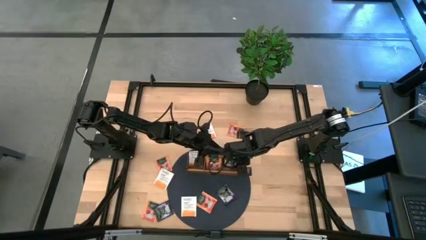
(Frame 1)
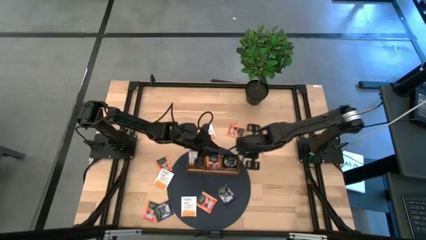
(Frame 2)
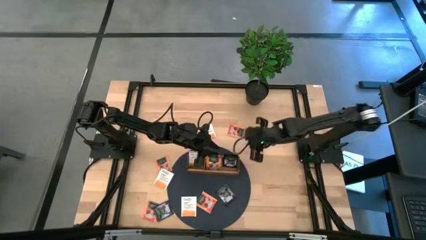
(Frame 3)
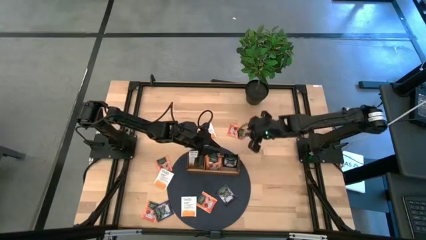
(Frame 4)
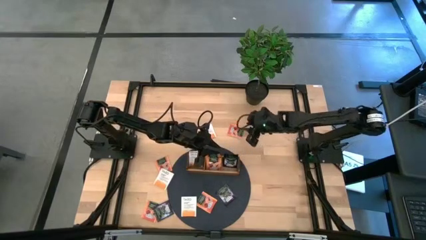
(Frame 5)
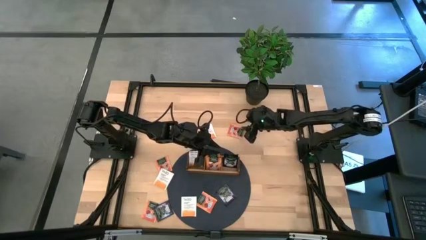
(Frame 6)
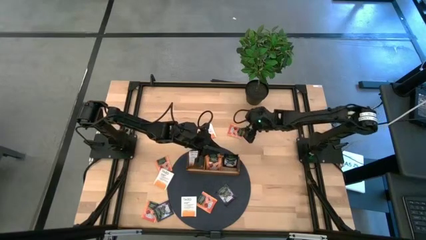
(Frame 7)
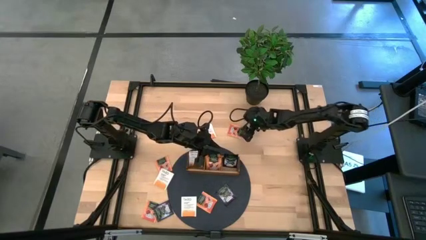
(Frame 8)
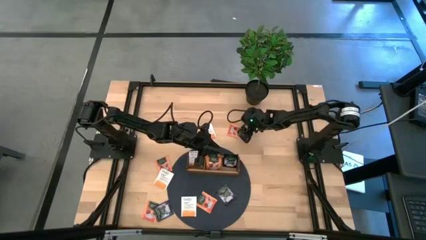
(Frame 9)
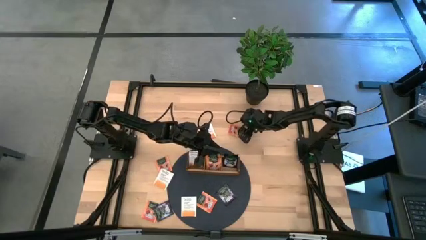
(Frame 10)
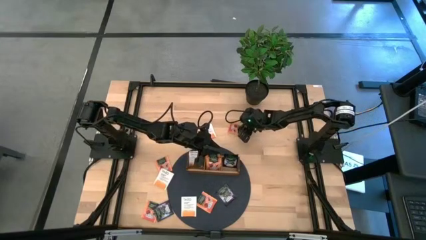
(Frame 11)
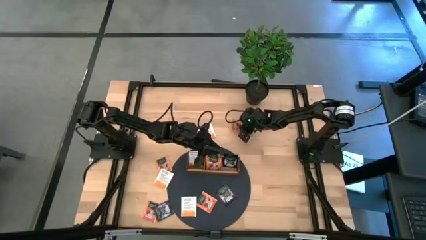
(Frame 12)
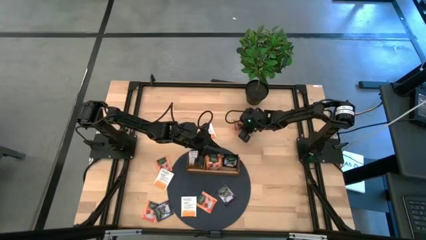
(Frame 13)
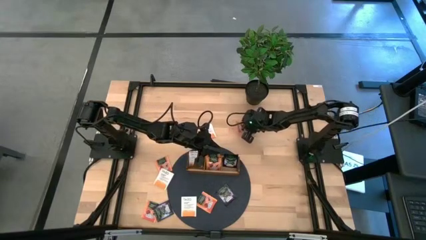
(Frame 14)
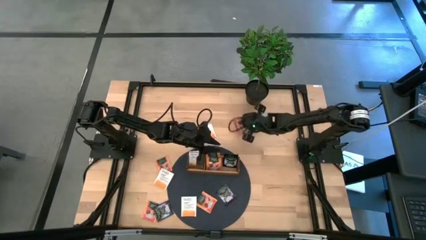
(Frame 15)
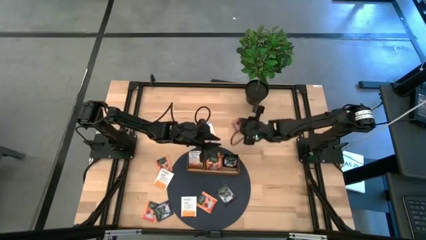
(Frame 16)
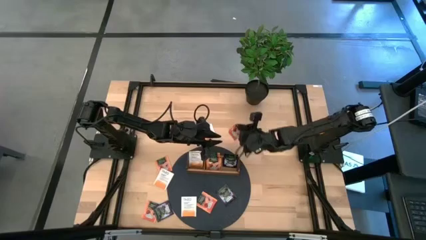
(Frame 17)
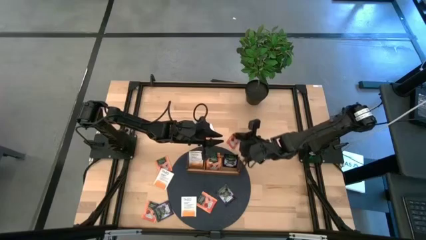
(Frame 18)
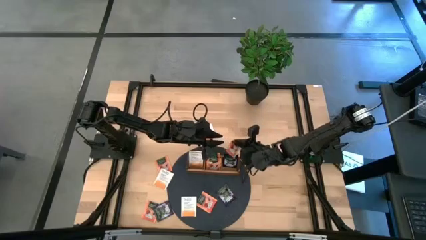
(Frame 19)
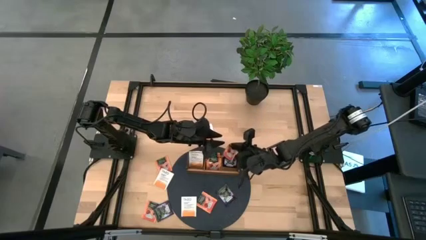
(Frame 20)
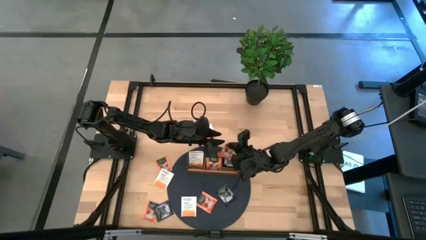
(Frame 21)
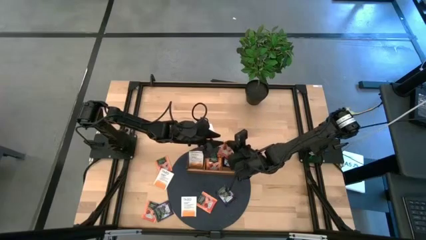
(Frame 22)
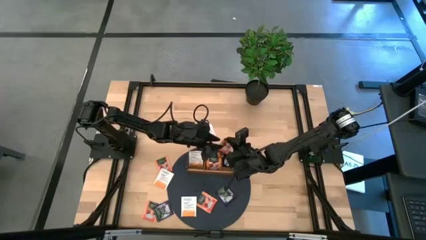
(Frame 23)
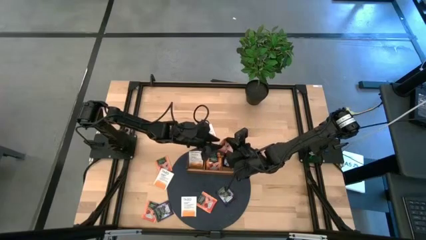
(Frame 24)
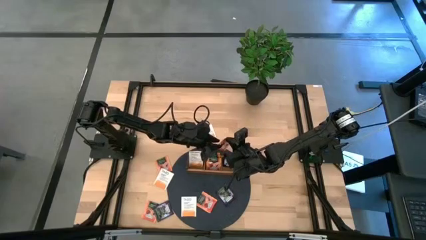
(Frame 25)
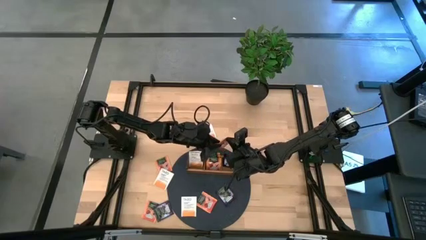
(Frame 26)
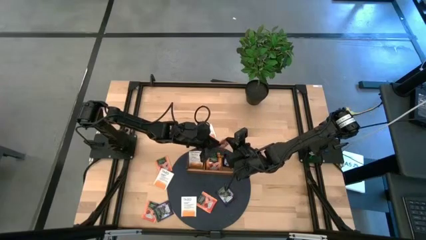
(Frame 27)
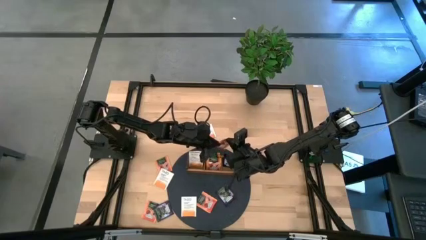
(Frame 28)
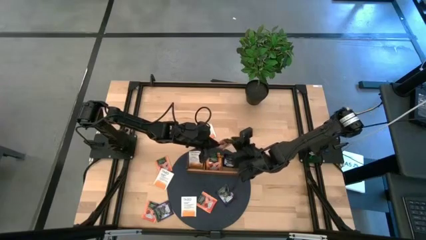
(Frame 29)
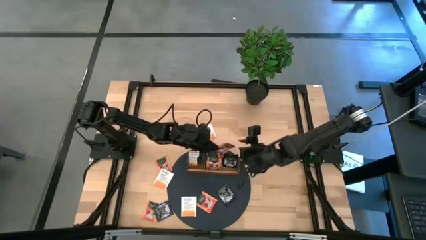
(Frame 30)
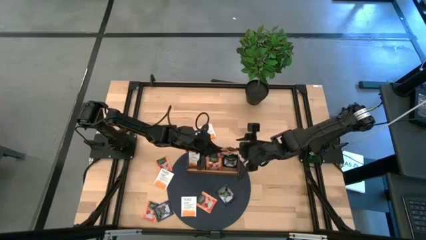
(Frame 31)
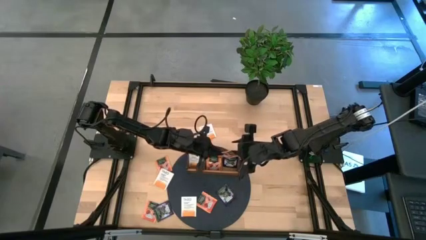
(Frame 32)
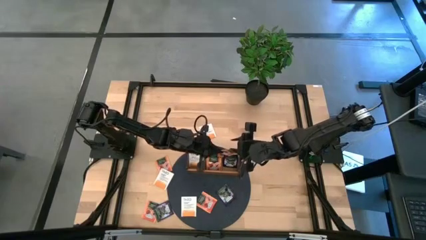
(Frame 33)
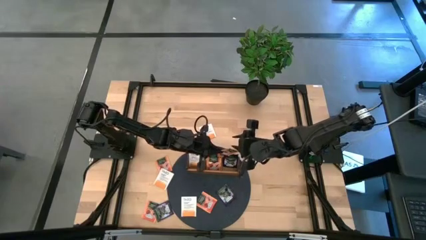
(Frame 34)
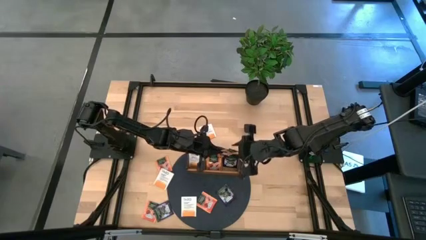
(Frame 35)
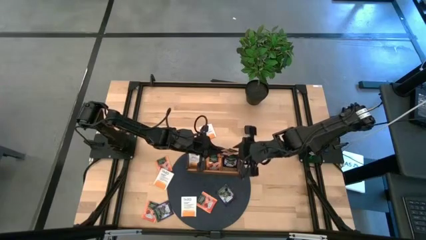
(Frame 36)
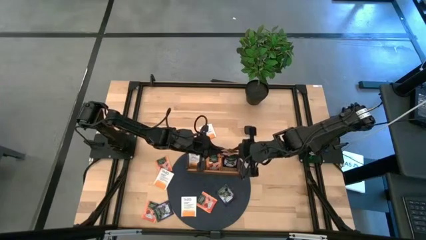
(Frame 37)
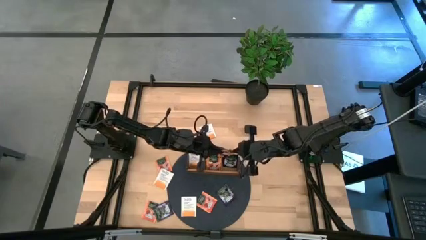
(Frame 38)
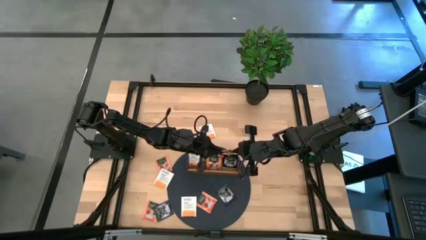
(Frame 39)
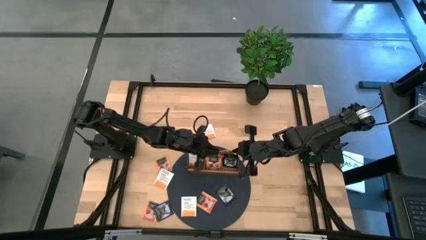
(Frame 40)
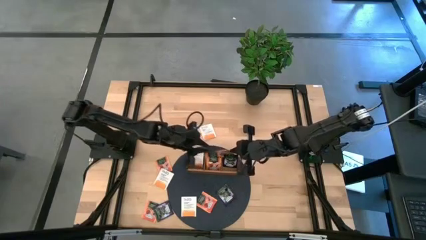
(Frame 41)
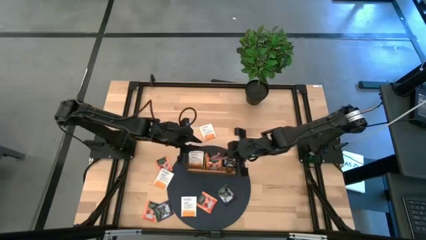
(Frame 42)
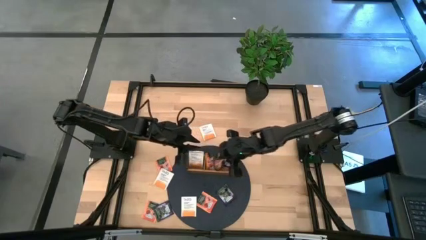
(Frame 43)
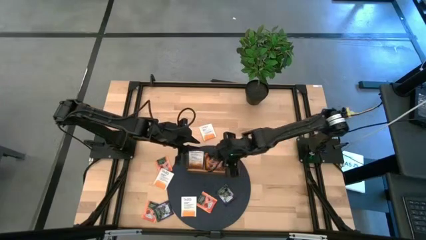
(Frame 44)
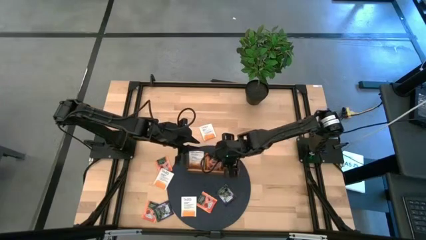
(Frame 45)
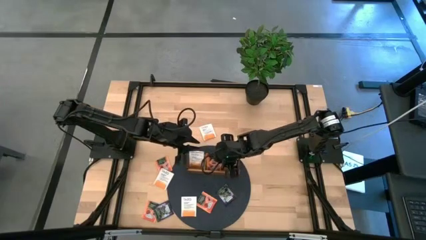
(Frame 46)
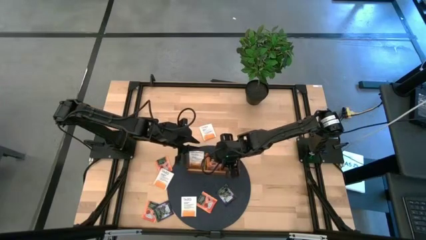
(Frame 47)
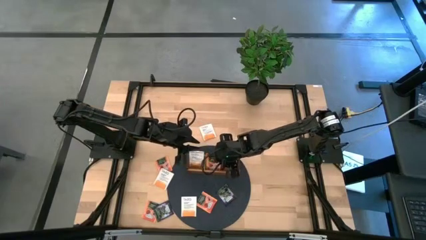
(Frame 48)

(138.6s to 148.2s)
Task: Pick & Place Tea
Put the orange black tea bag into the middle section of the wooden organizer

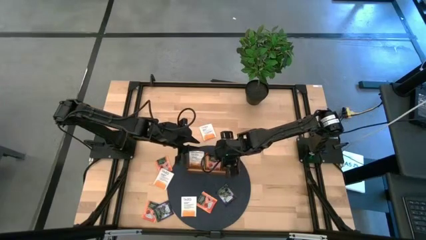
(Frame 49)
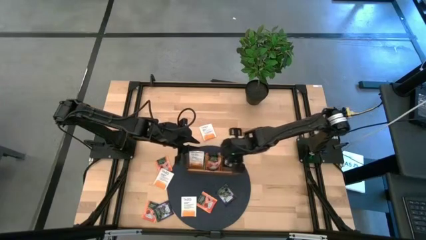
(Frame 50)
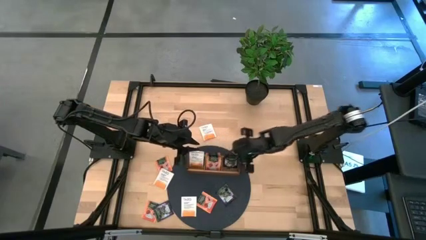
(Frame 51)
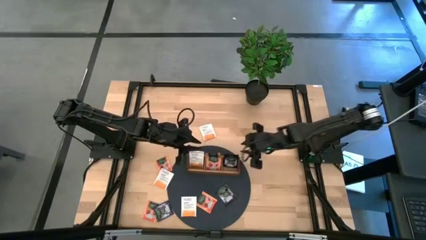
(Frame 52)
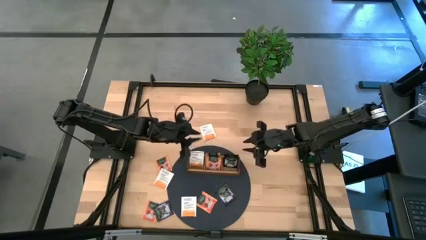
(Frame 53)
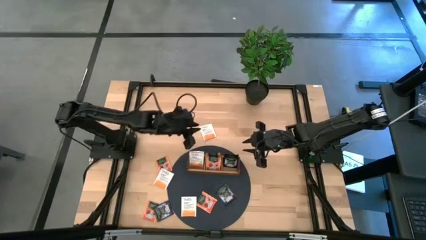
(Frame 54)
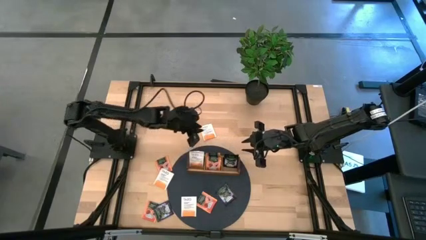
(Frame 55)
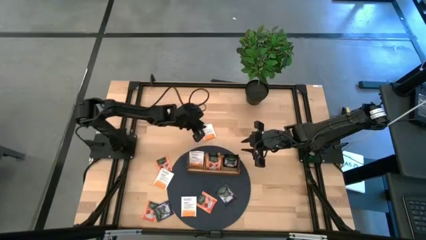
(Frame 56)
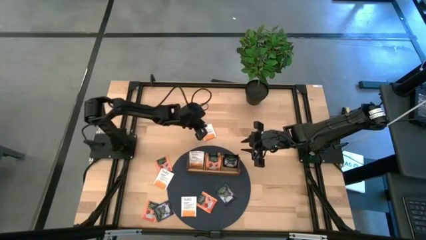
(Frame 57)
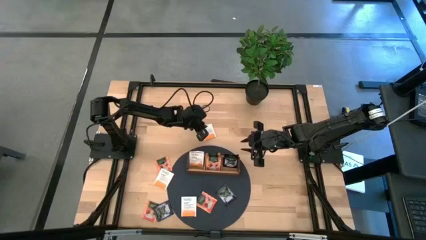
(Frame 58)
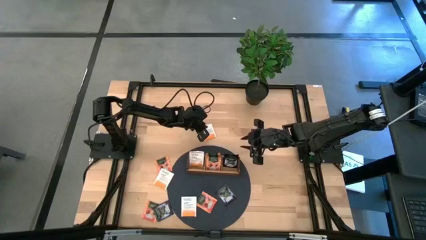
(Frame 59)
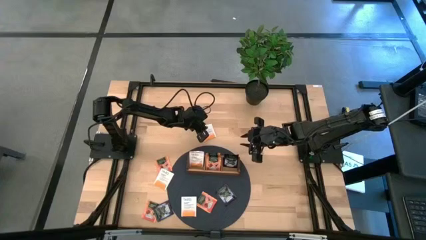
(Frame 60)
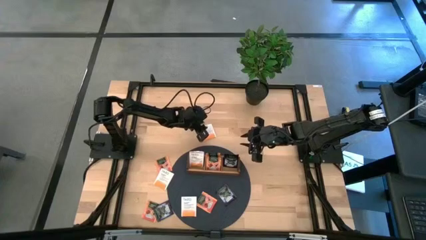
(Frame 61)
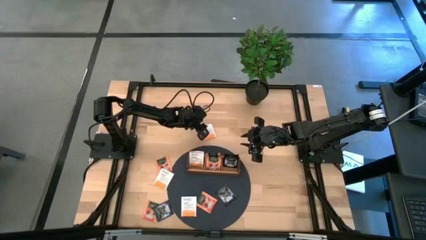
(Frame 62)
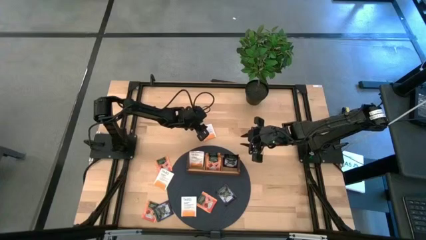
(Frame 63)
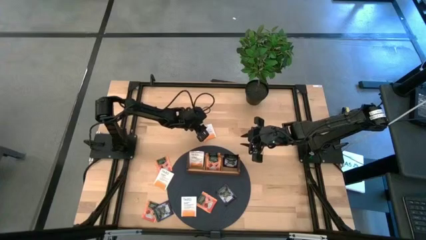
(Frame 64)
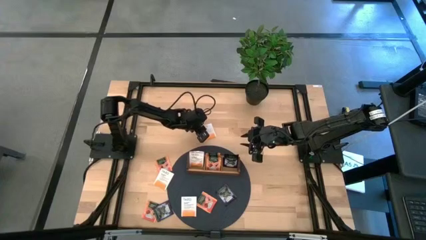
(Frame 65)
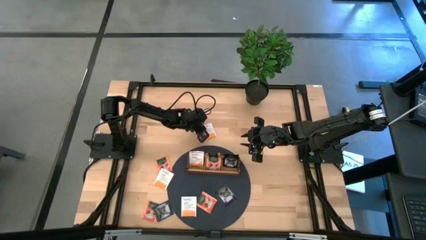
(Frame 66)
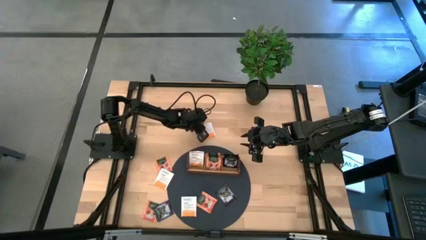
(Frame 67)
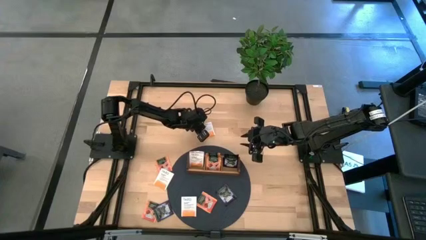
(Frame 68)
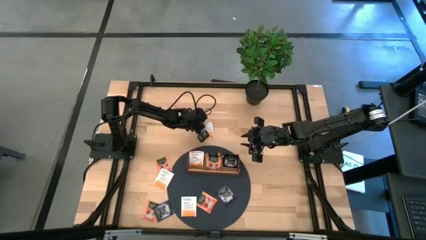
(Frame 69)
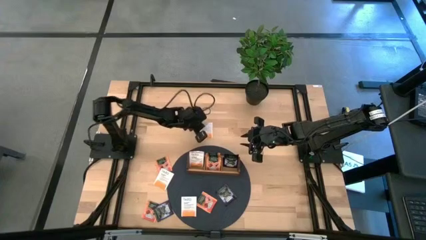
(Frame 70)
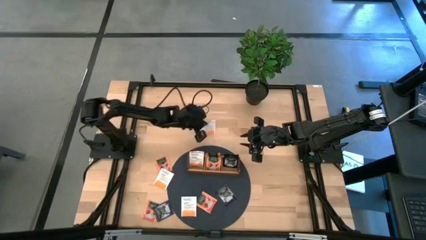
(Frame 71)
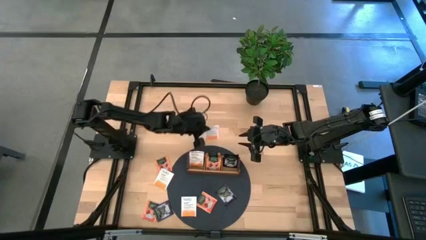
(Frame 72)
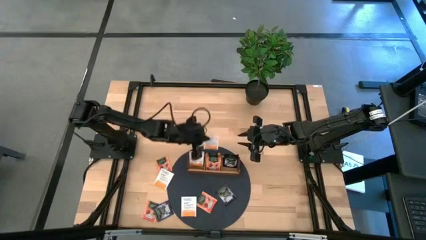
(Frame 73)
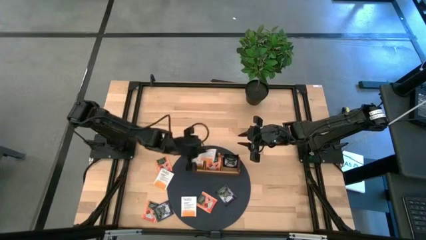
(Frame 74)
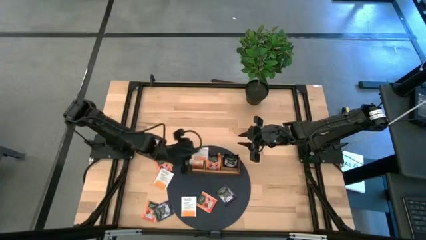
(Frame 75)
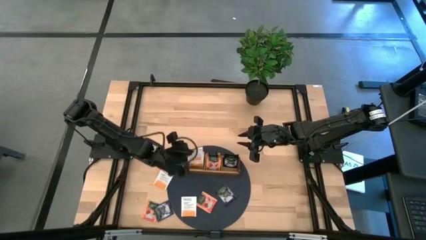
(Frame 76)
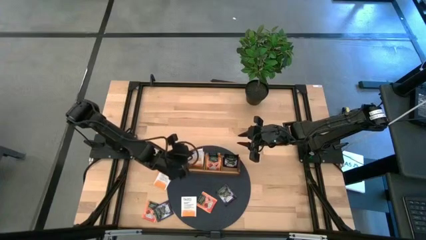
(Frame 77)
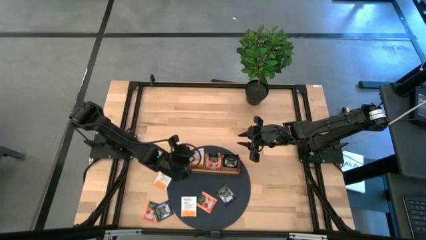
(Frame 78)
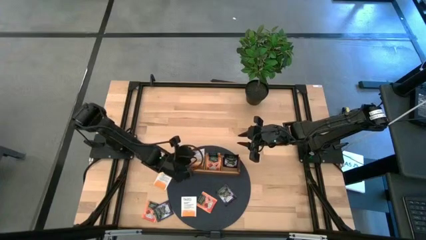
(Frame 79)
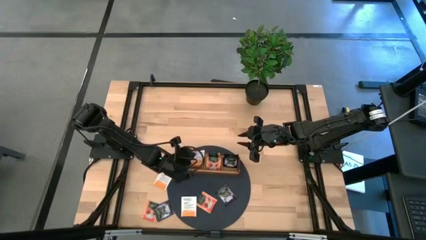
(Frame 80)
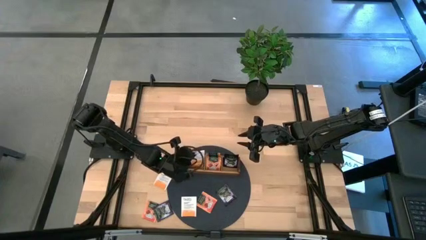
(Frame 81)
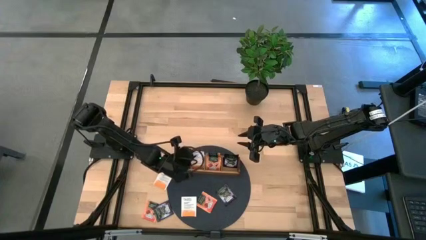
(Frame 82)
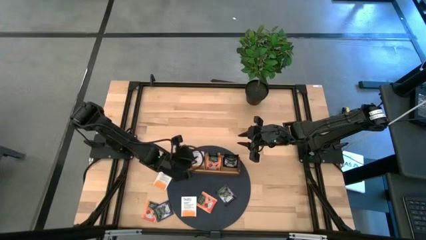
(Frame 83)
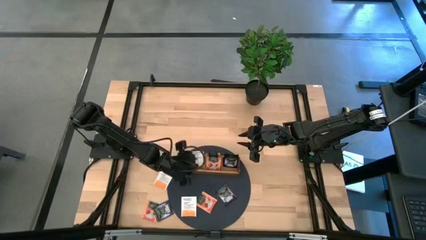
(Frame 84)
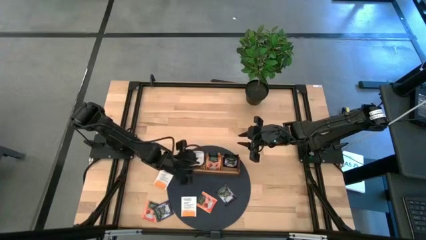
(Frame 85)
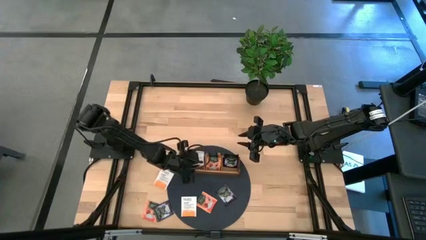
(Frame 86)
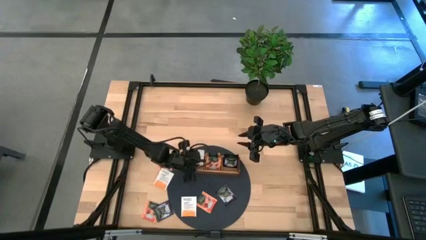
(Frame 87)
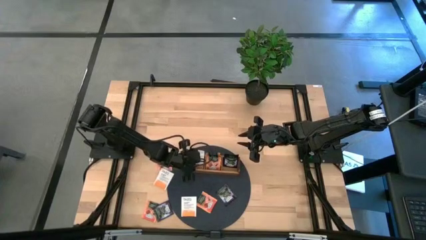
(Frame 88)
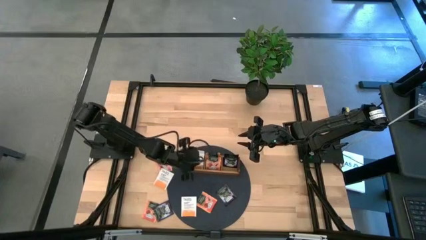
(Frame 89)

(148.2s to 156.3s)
Put the white orange tea bag into the left section of the wooden organizer
